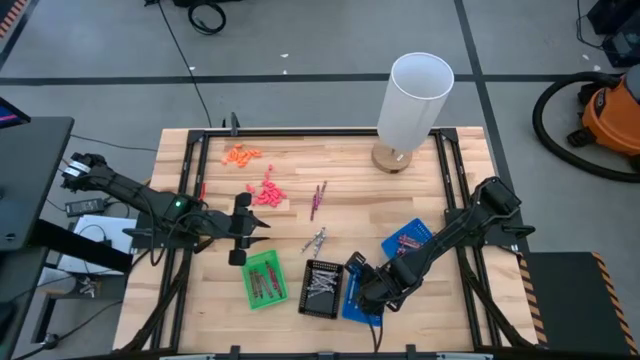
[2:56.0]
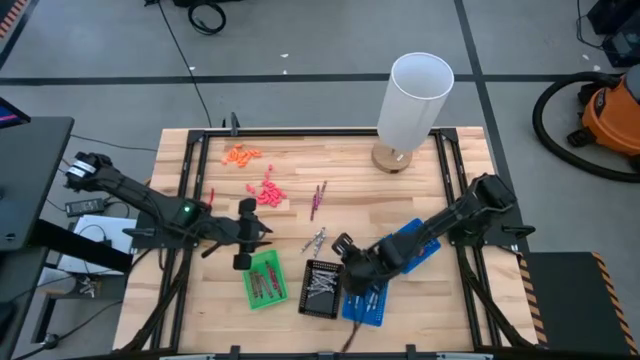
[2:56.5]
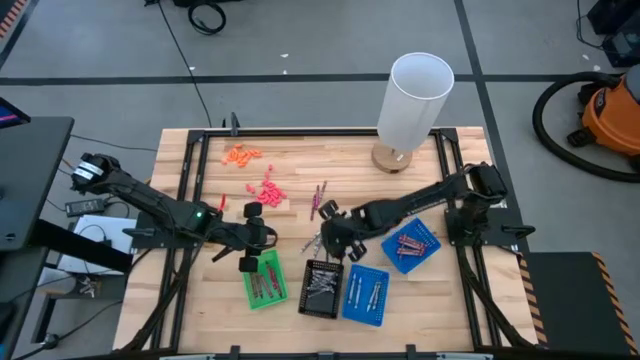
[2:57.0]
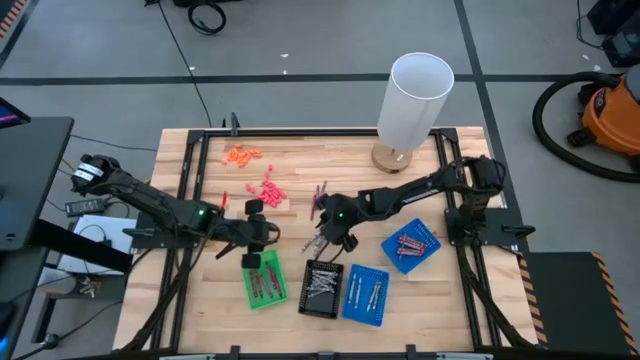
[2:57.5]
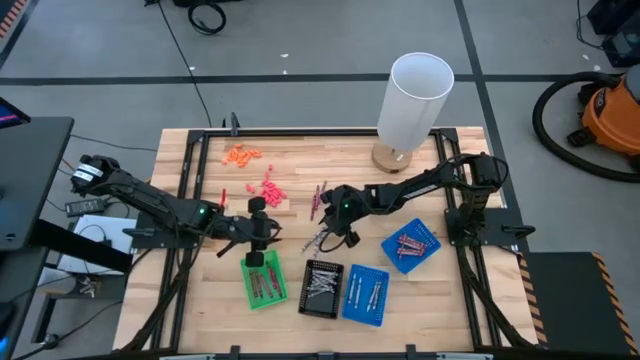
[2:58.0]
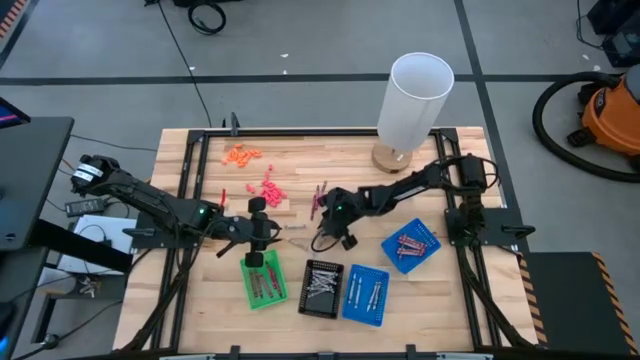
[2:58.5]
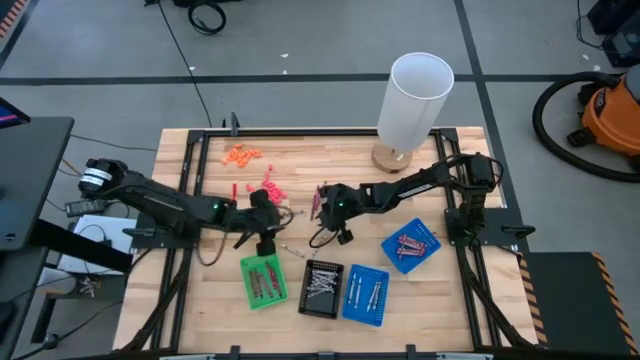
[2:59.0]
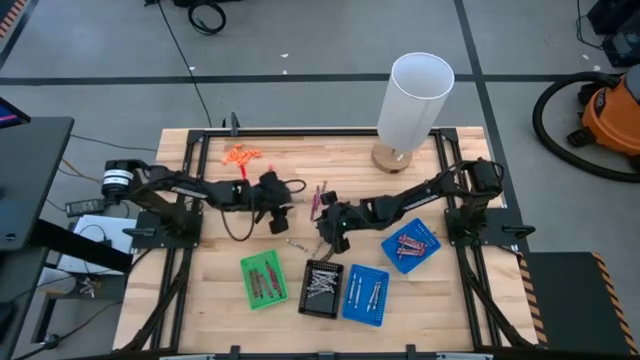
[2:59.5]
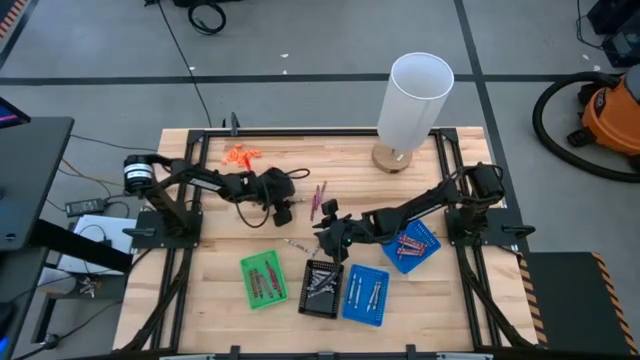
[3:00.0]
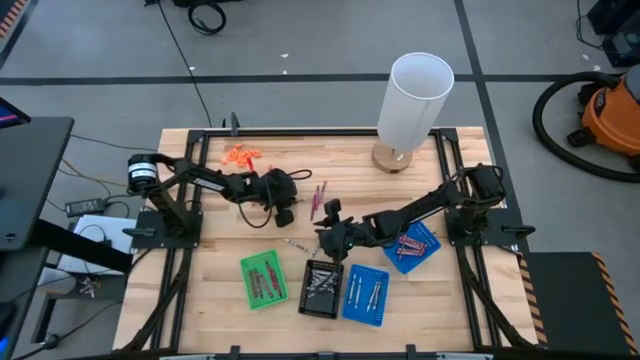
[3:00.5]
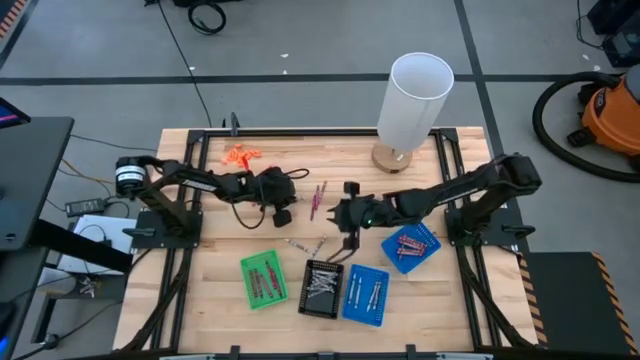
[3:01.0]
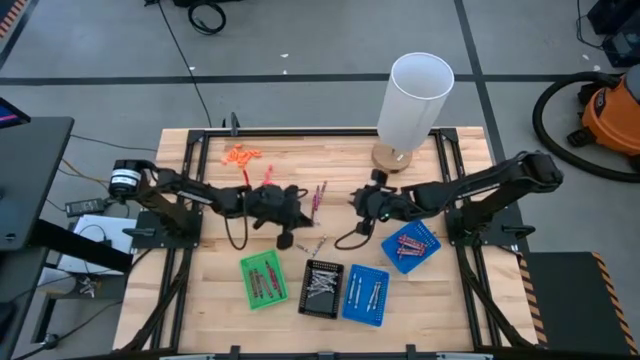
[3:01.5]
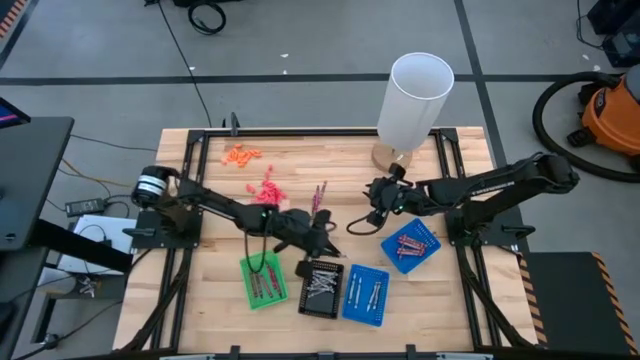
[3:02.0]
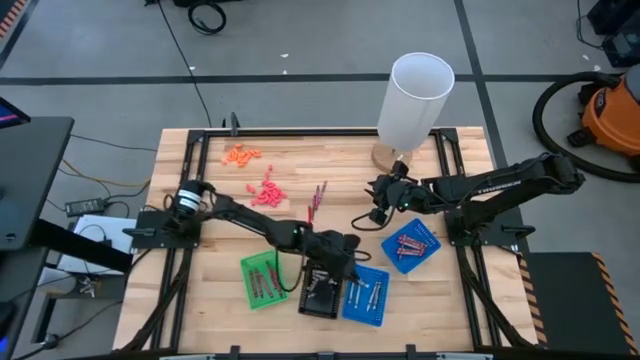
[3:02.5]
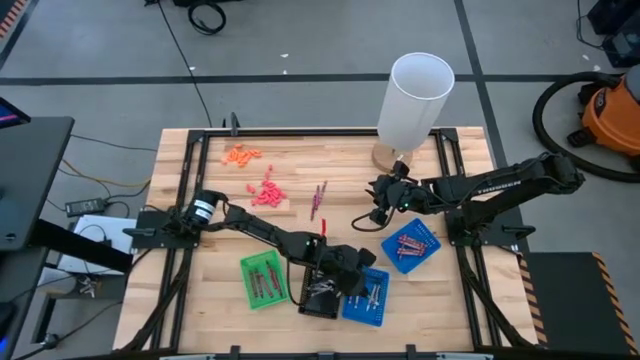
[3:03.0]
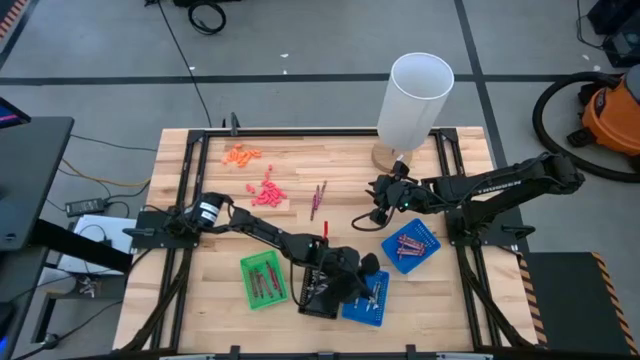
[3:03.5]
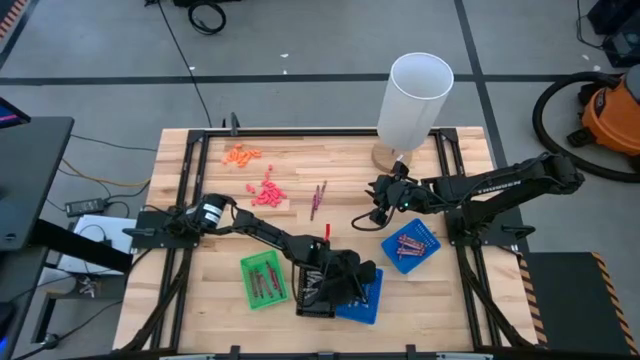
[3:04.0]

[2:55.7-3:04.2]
Task: Sort crayons
Put the white crayon into the left blue basket

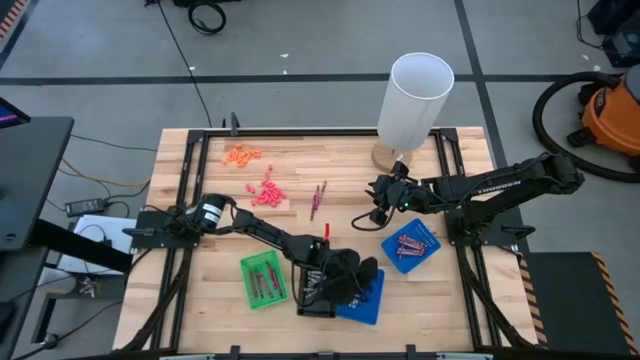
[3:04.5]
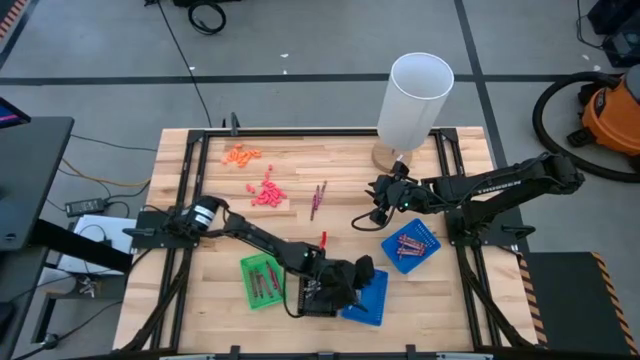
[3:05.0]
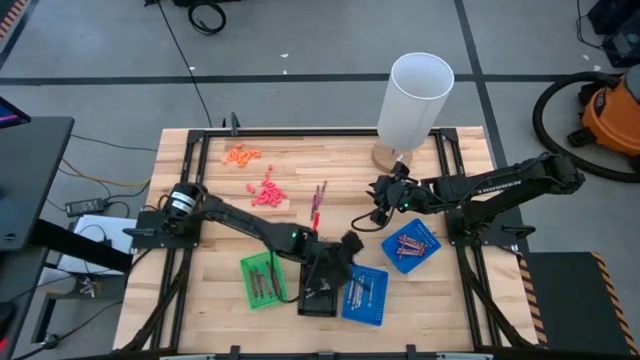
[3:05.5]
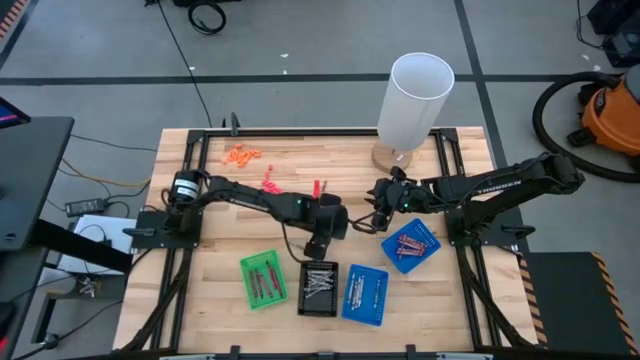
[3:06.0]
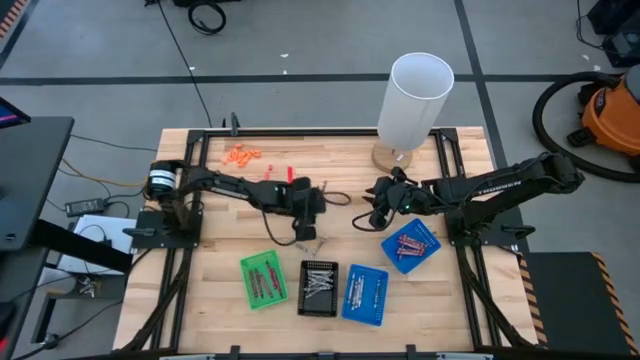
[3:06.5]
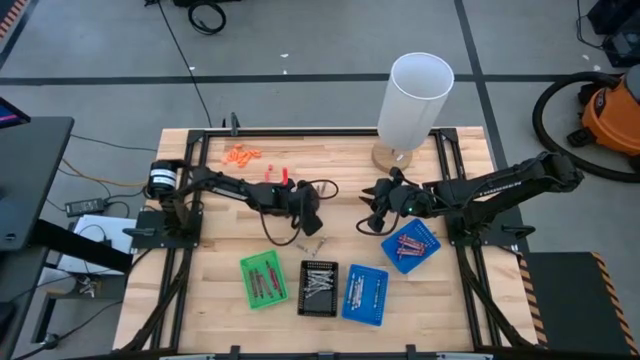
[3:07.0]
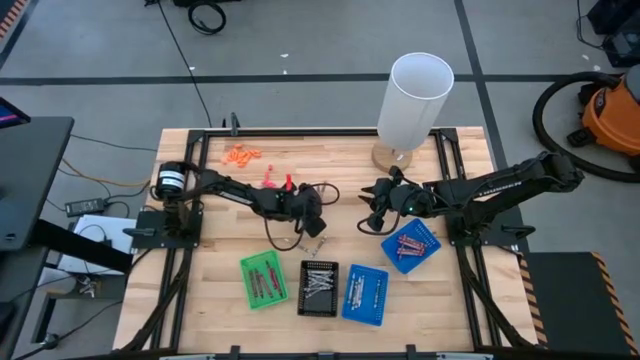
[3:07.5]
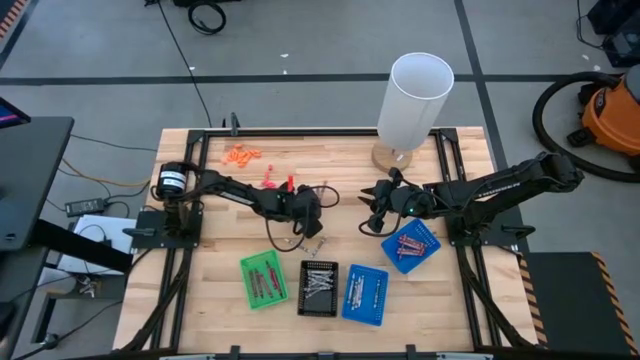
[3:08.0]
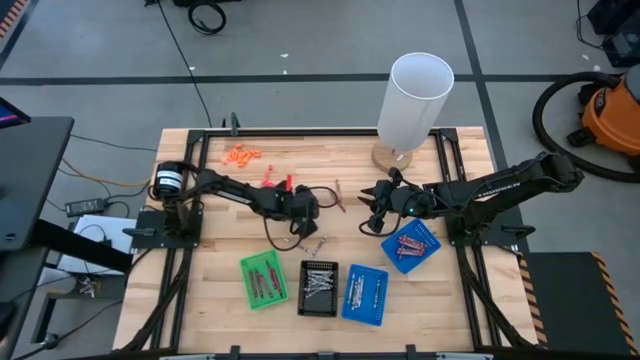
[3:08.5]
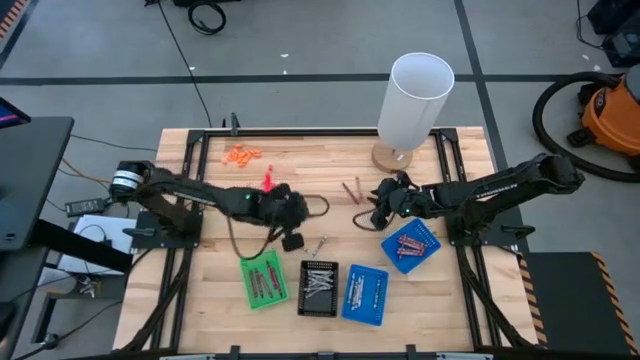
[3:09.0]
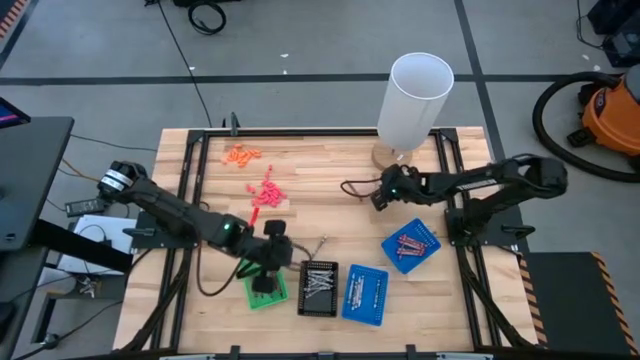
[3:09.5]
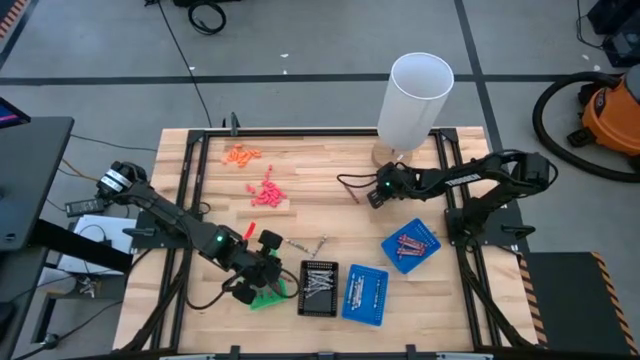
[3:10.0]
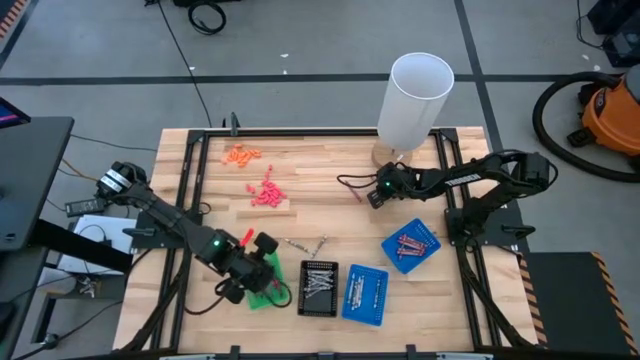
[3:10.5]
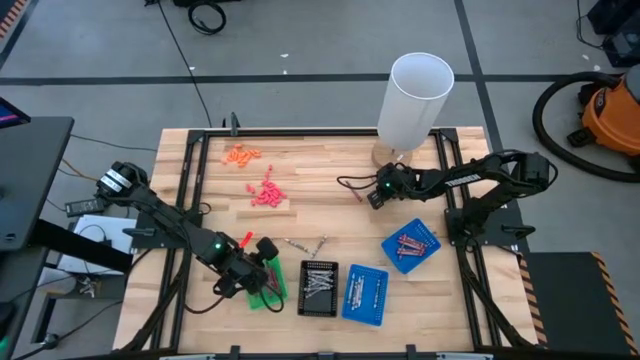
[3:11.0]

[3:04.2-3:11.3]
Put the red crayon into the green basket

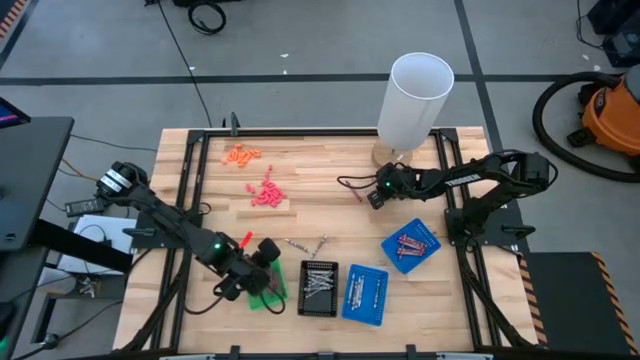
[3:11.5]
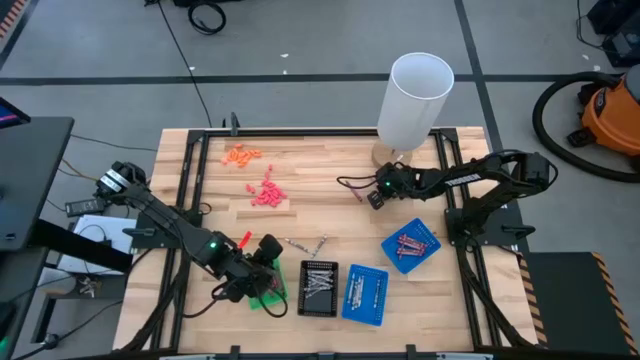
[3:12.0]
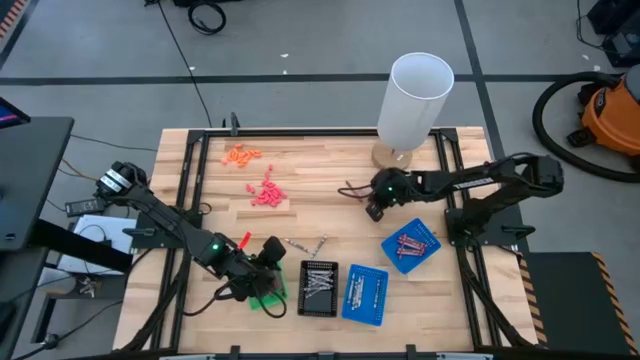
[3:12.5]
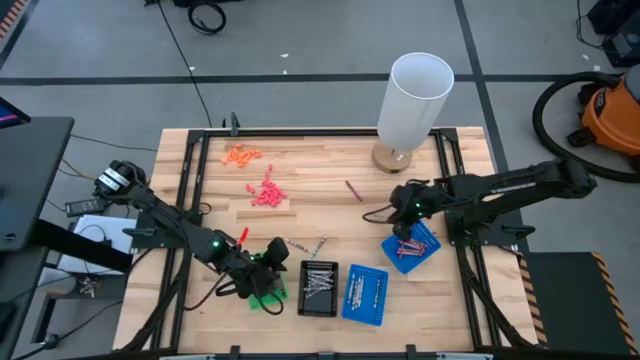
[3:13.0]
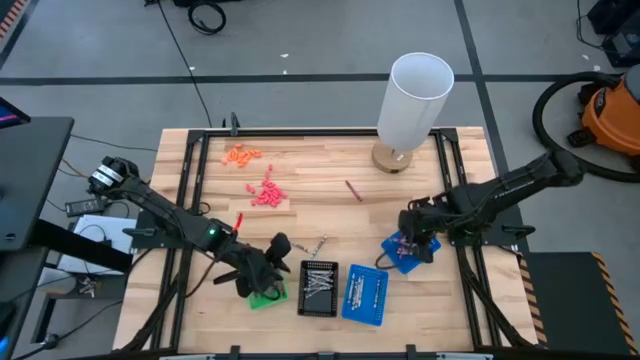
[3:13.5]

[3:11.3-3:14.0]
Put the pink crayon into the right blue basket

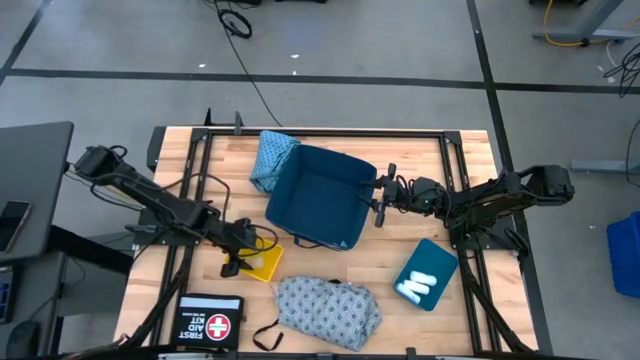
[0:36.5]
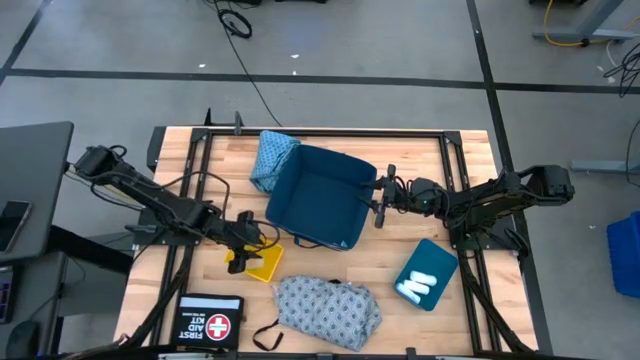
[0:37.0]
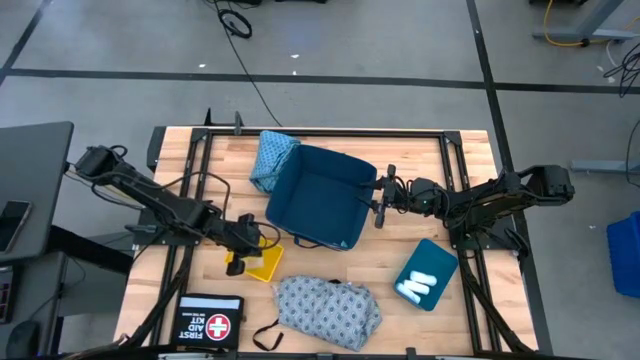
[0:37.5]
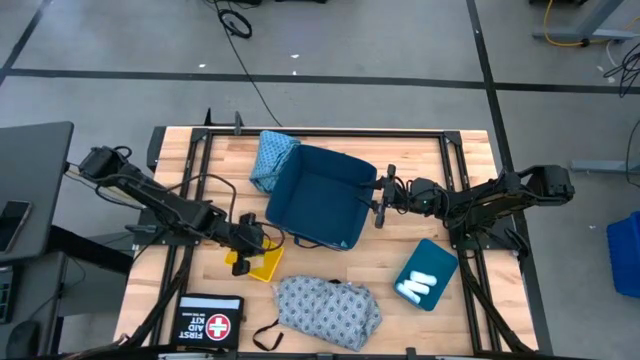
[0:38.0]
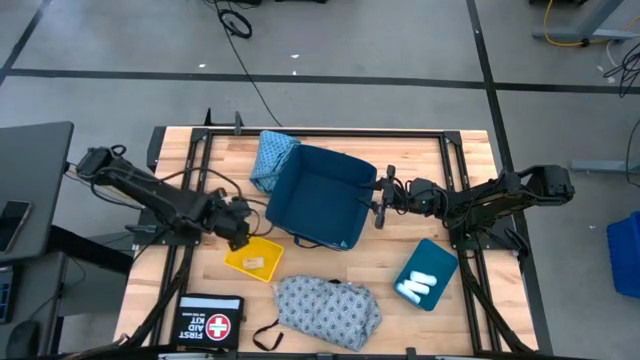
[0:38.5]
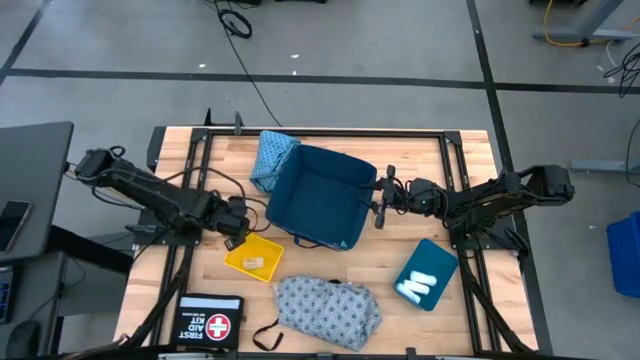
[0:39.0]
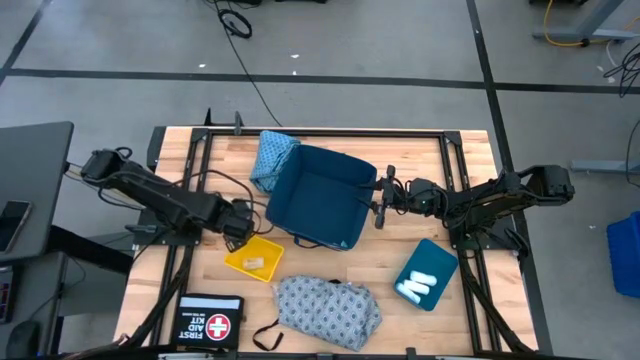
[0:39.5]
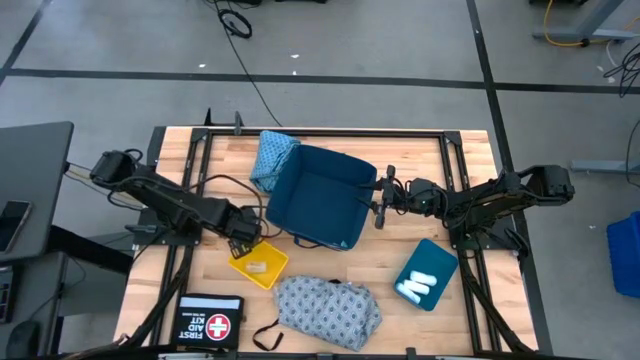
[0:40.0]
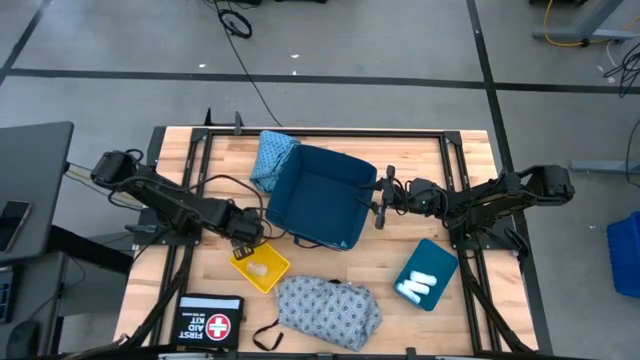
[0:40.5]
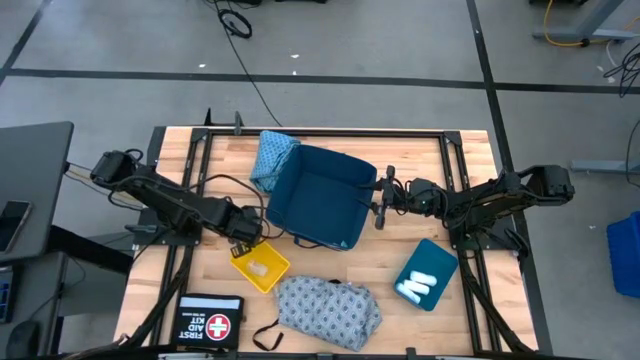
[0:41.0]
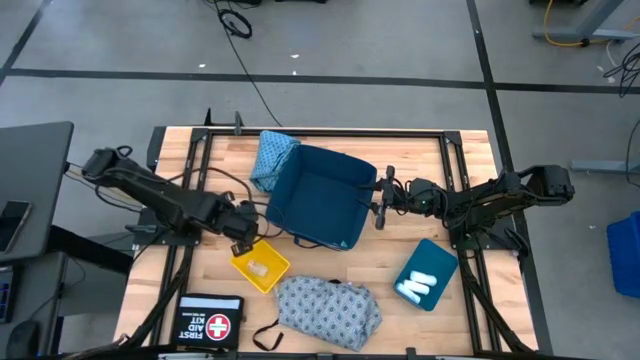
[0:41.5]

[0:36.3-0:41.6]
Task: Pick & place medical supplies in basket/bin
Put the top transparent pill bottle into the yellow bin
